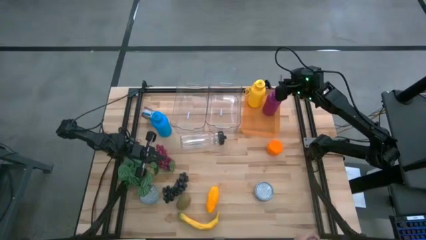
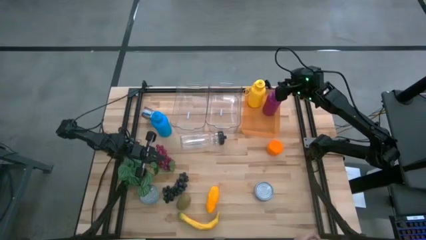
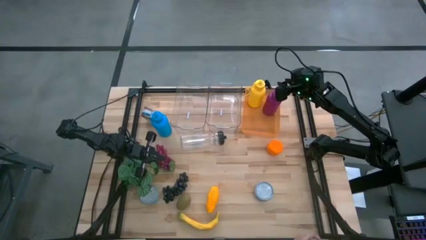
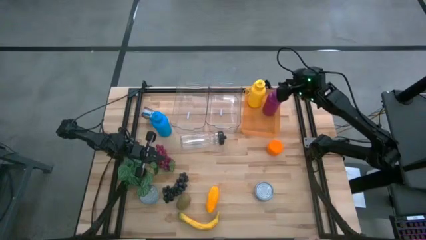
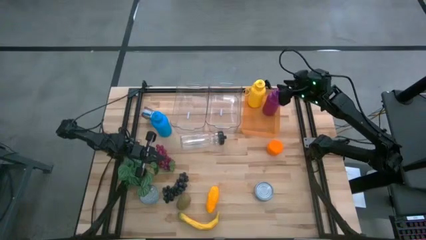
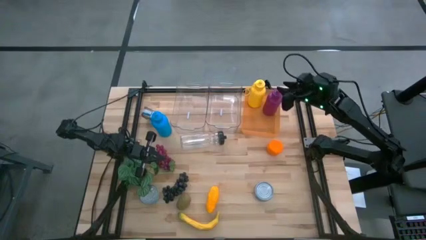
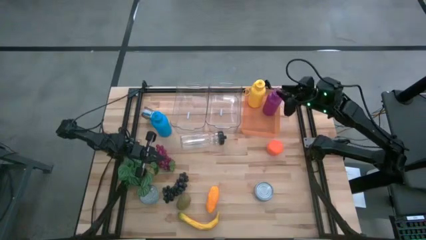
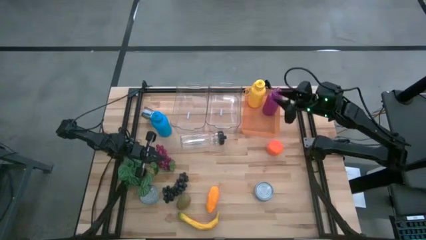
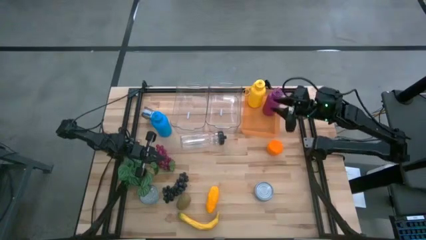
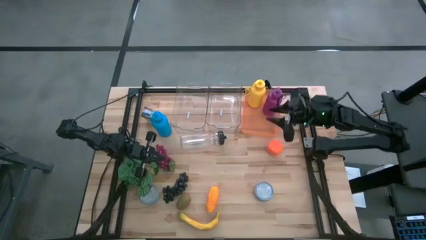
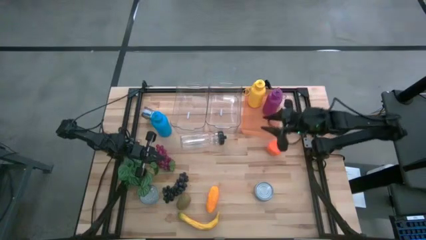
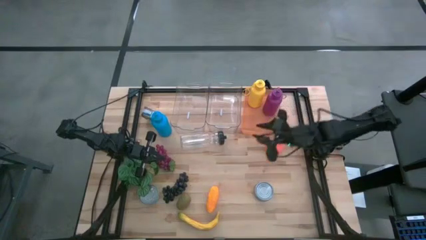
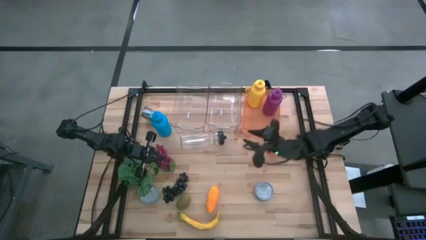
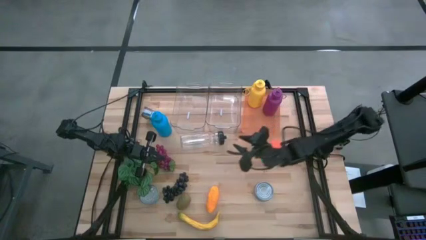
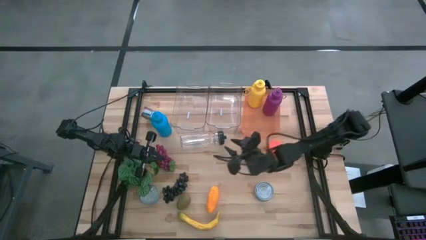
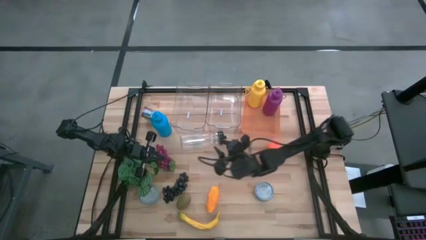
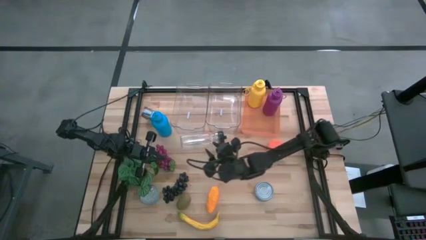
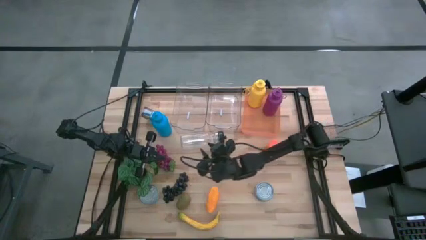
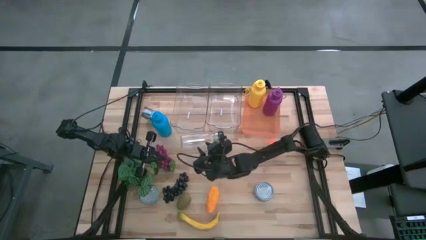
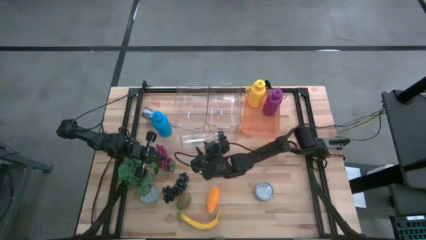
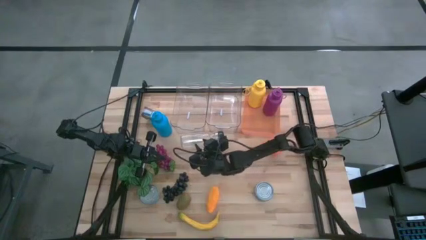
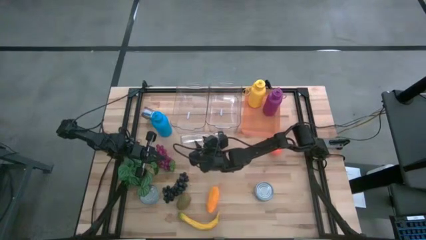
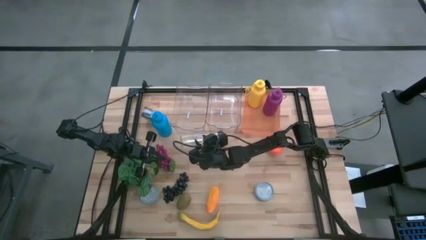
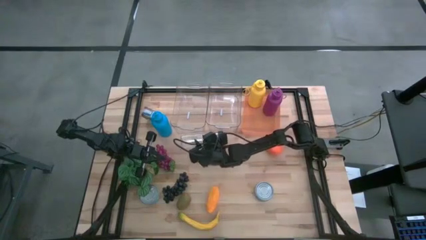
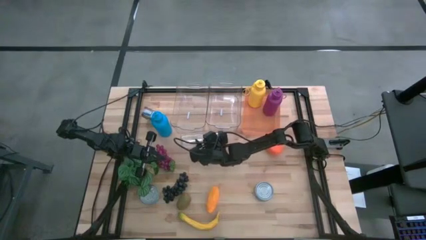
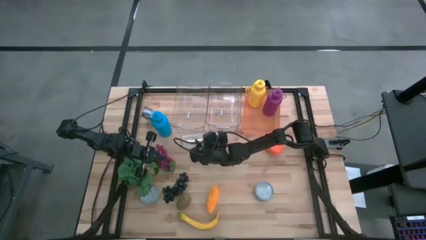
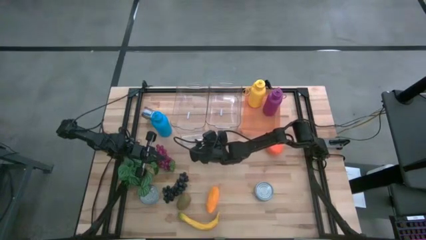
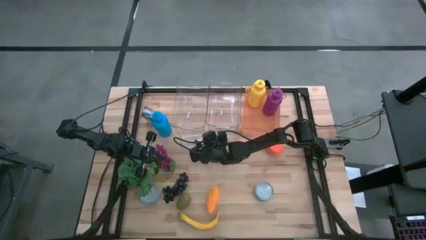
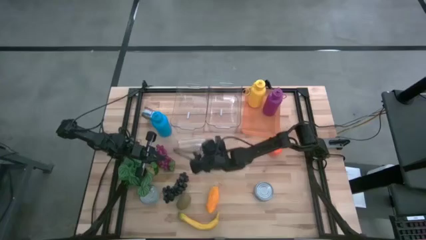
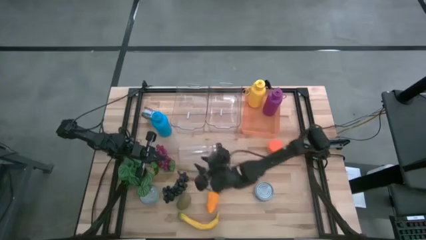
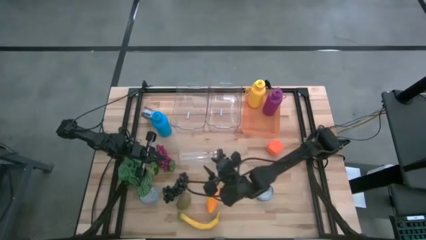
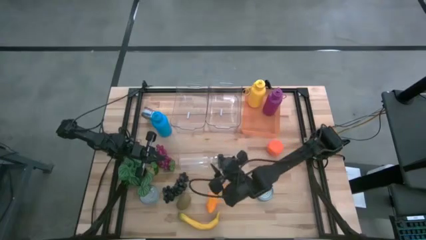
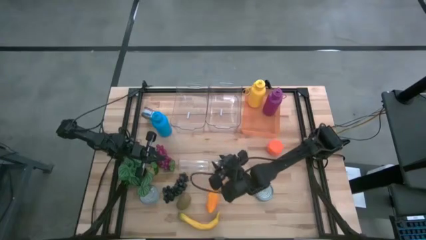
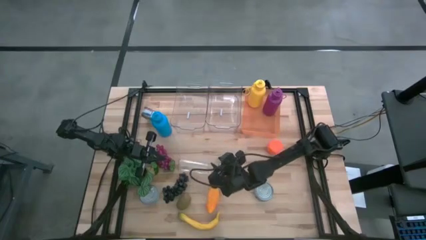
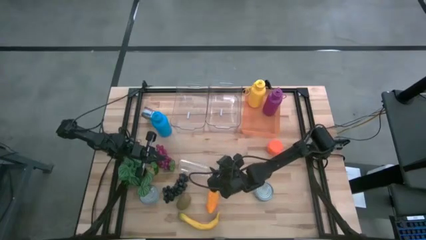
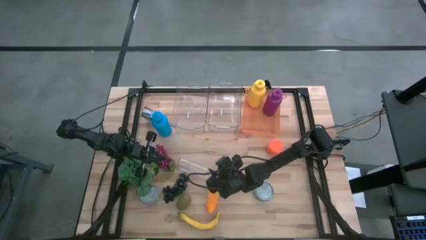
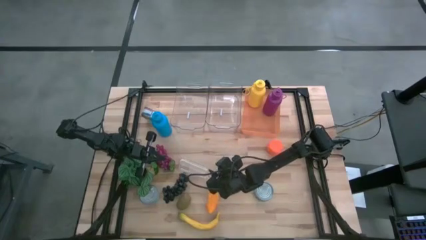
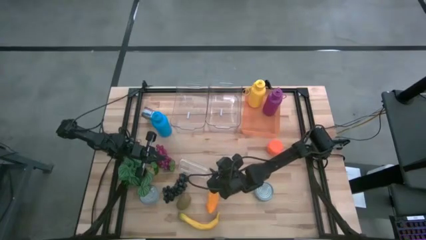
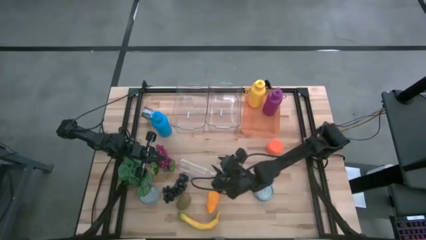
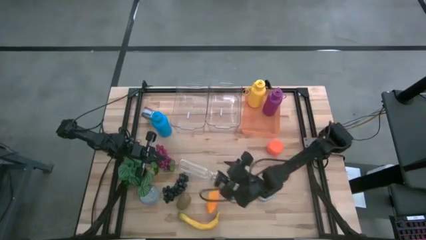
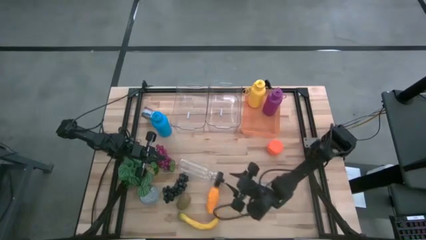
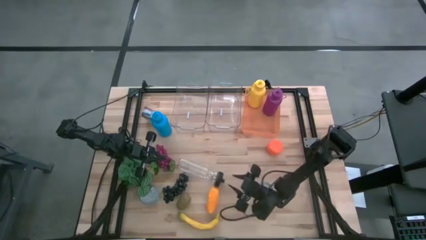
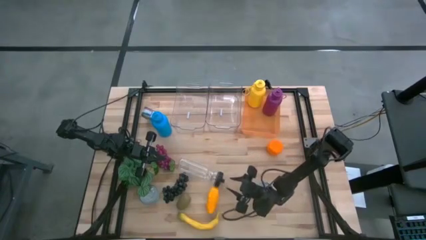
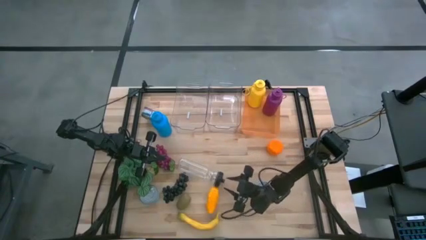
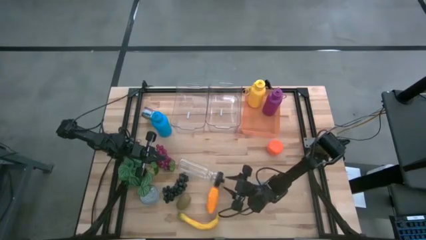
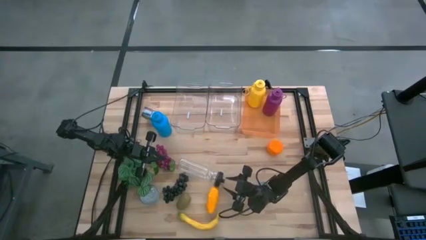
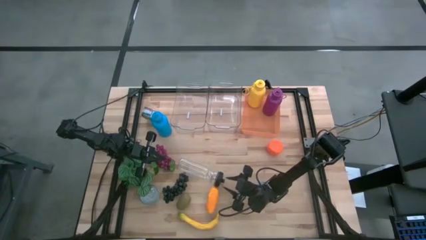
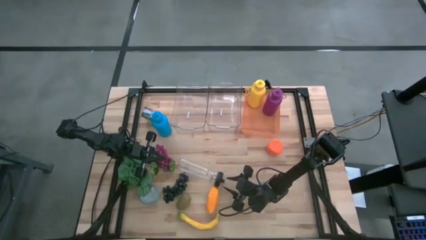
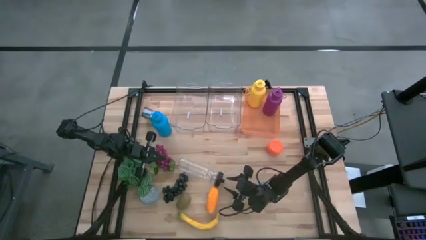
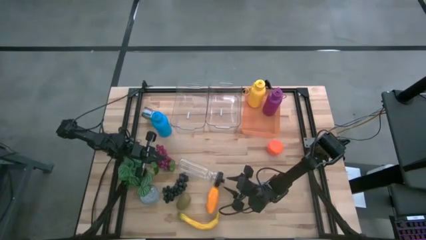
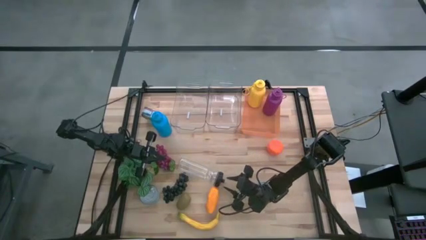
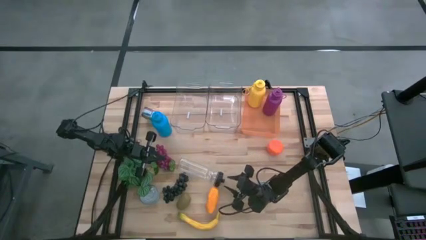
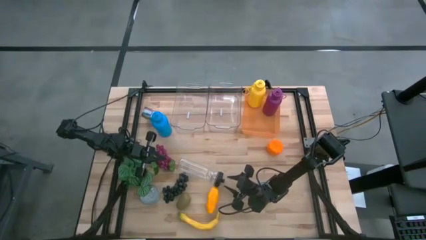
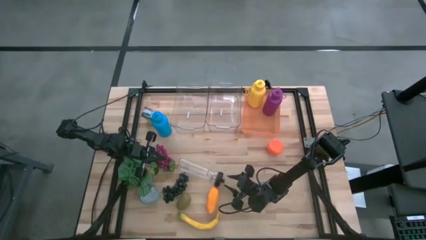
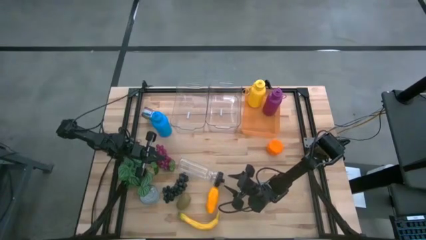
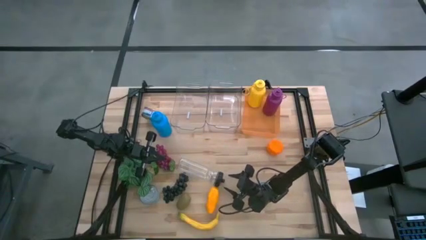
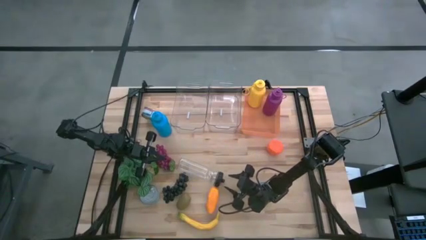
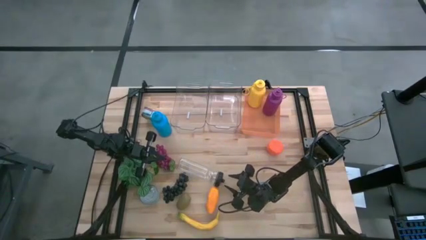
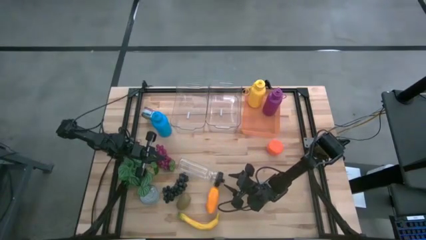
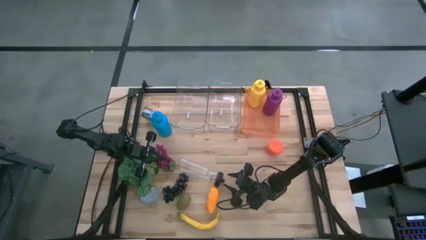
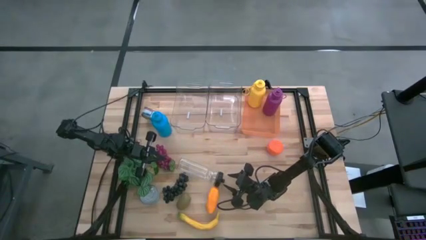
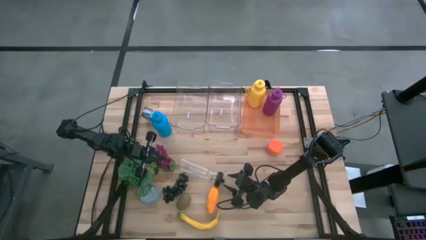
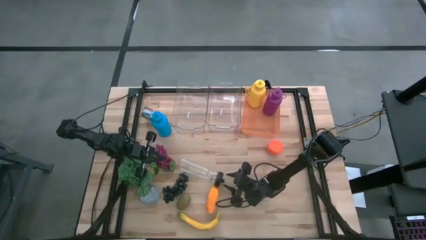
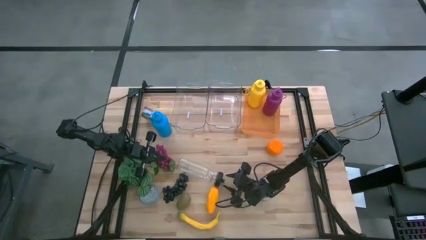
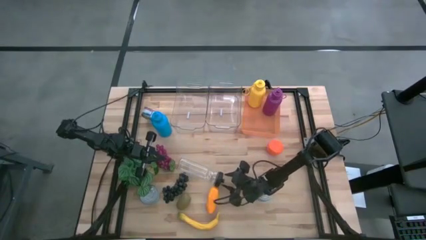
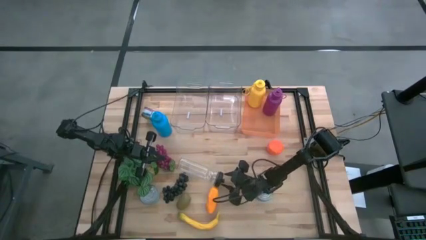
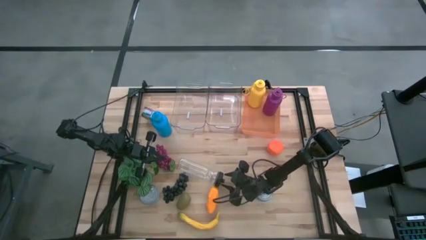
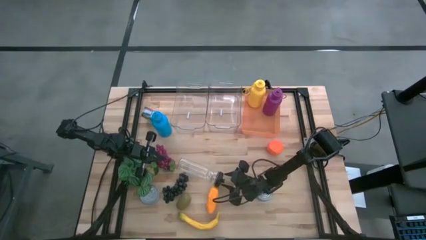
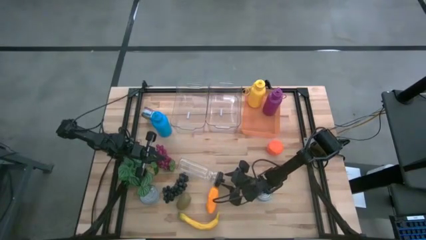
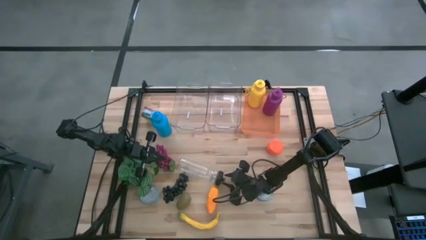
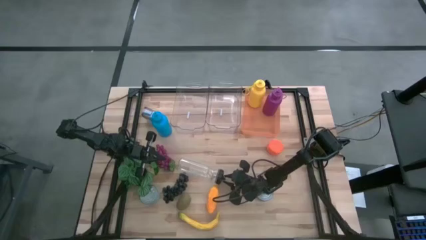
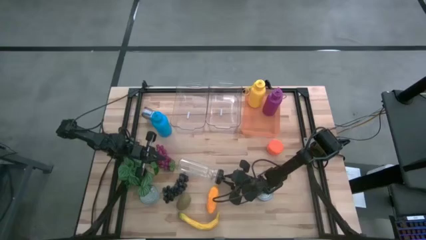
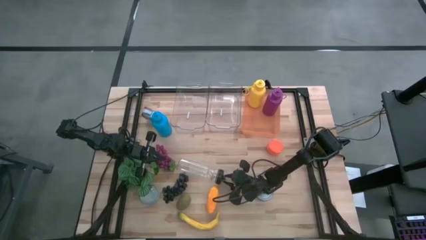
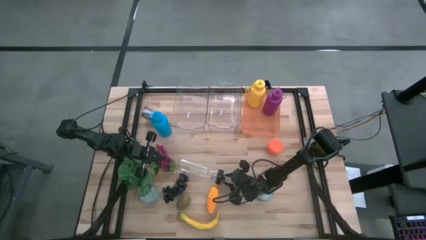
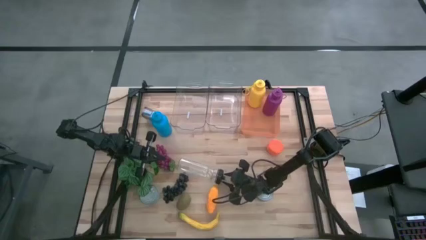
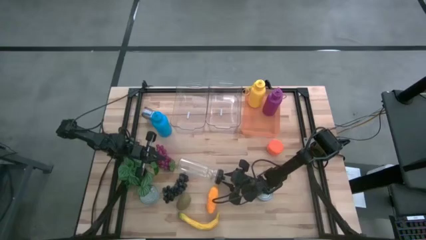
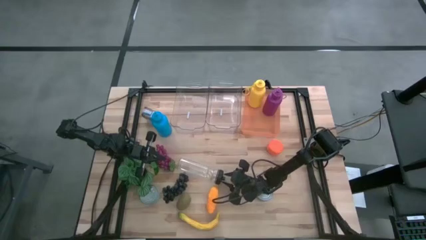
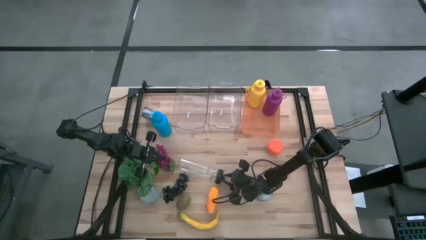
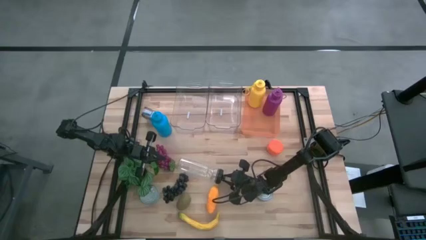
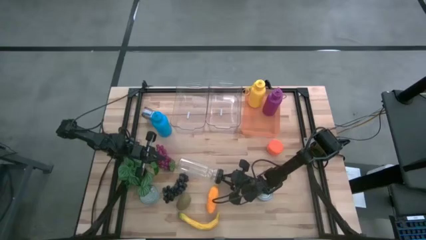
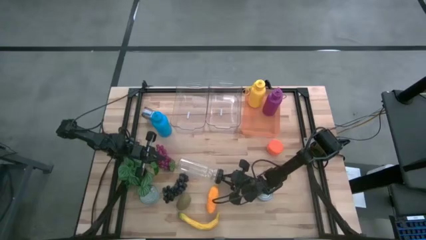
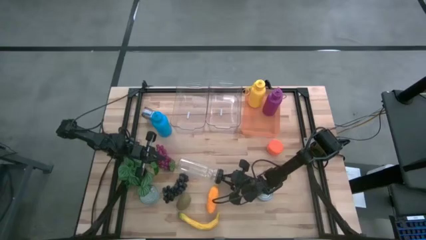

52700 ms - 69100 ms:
Task: Pick & Place Food Item
Put the transparent water bottle into the orange bin
